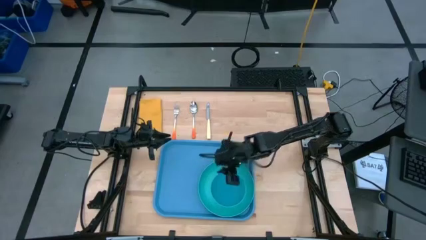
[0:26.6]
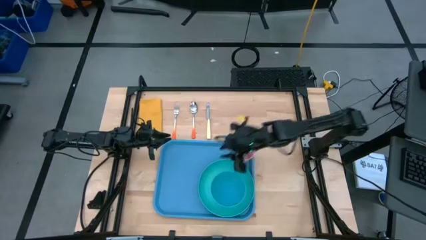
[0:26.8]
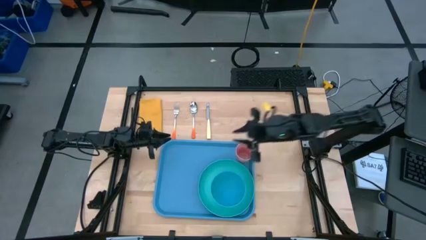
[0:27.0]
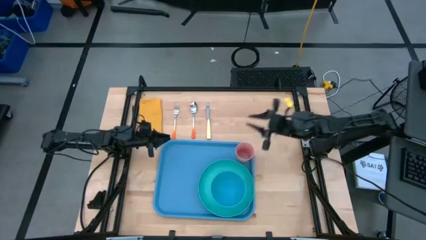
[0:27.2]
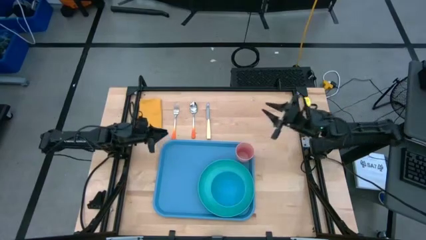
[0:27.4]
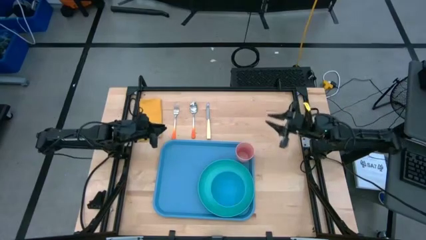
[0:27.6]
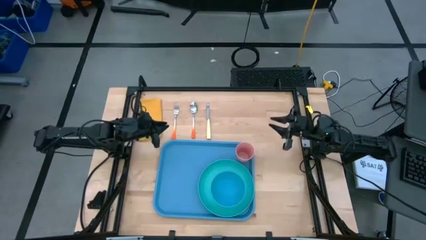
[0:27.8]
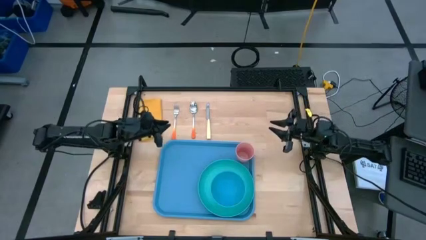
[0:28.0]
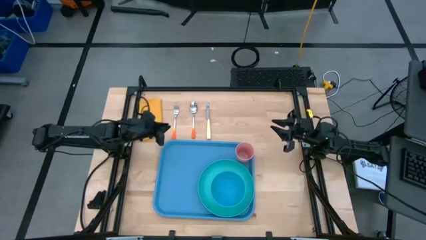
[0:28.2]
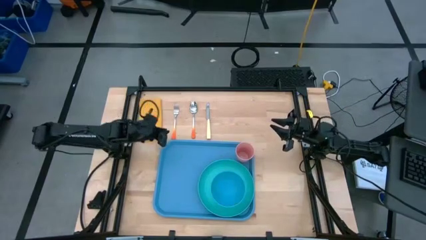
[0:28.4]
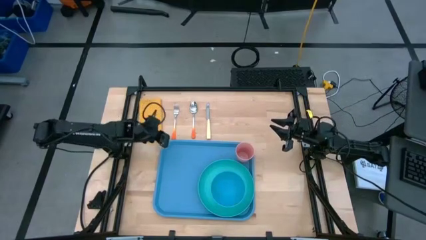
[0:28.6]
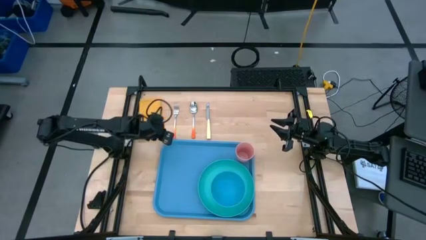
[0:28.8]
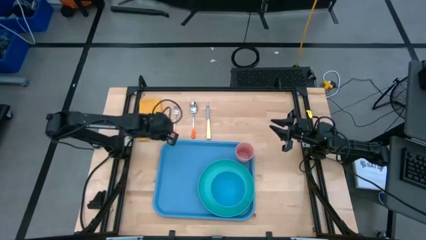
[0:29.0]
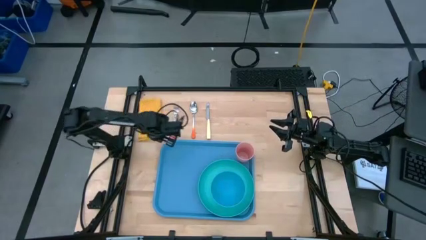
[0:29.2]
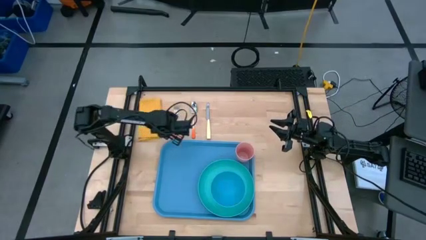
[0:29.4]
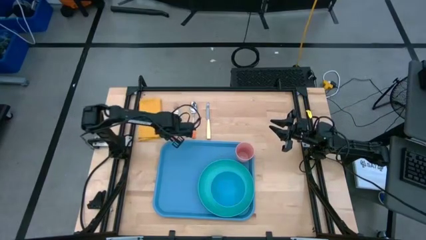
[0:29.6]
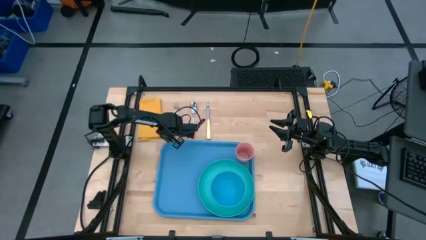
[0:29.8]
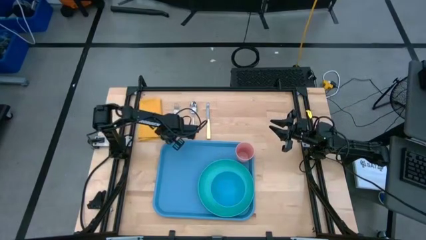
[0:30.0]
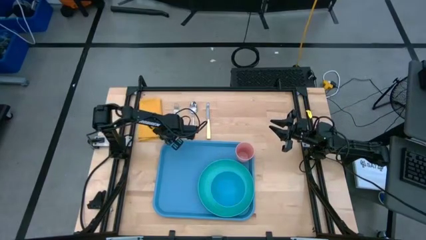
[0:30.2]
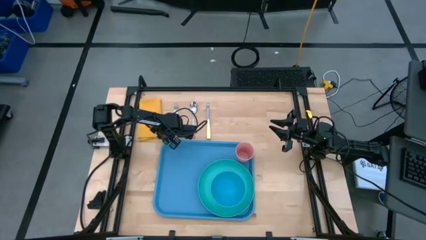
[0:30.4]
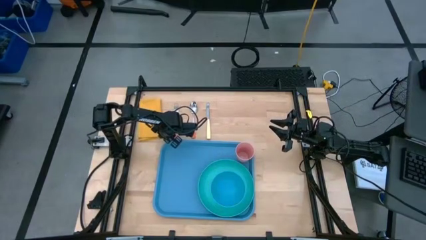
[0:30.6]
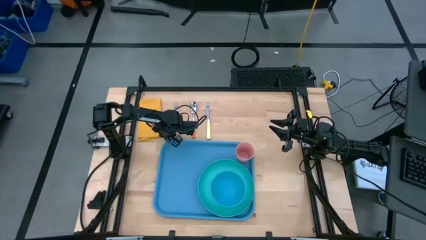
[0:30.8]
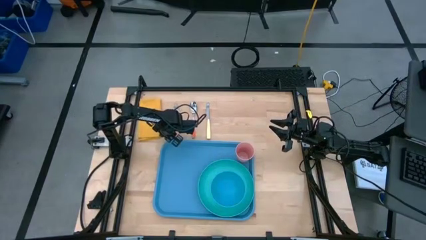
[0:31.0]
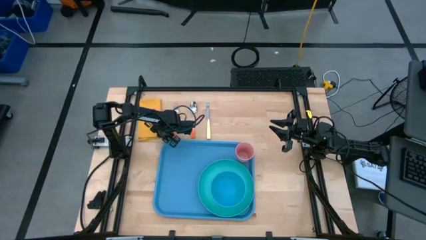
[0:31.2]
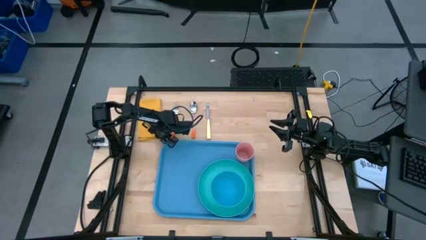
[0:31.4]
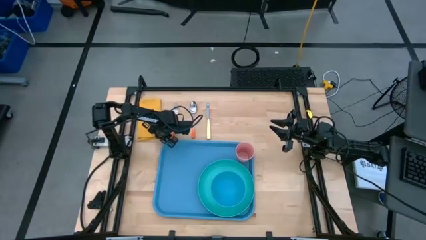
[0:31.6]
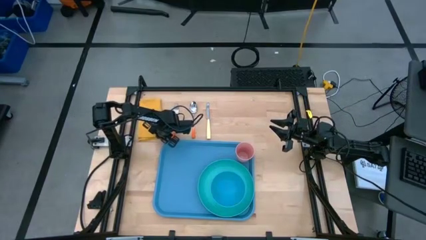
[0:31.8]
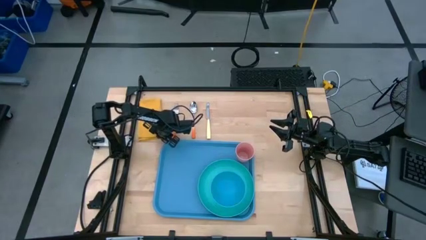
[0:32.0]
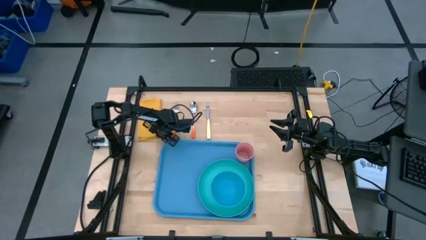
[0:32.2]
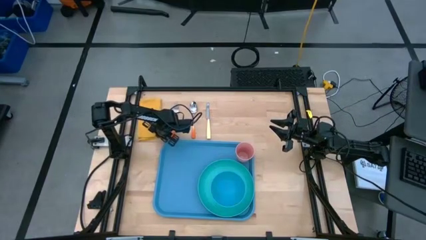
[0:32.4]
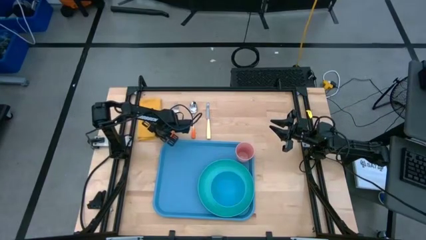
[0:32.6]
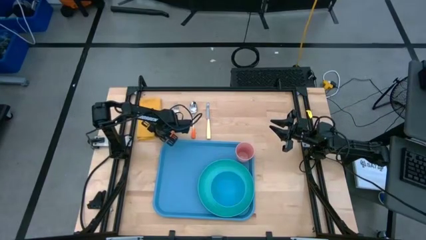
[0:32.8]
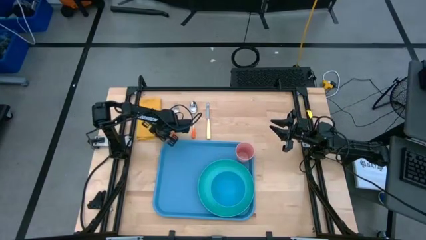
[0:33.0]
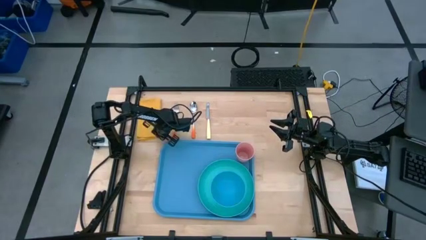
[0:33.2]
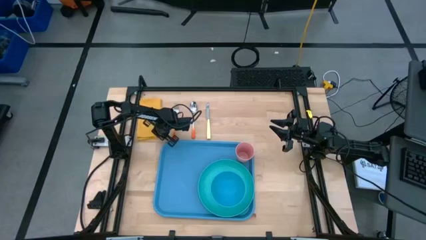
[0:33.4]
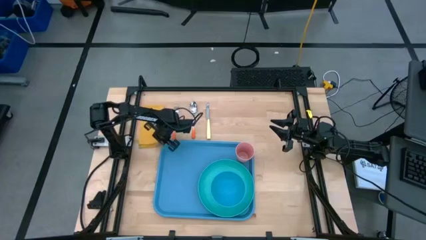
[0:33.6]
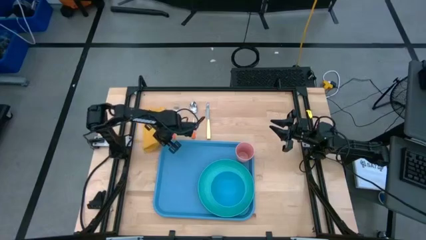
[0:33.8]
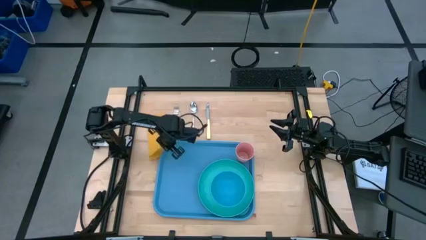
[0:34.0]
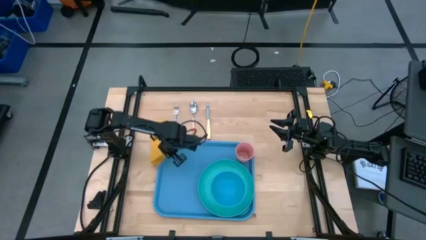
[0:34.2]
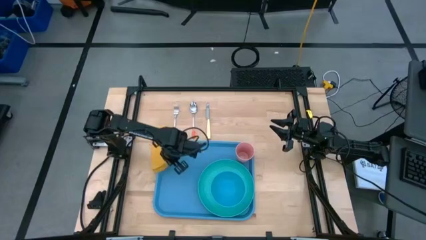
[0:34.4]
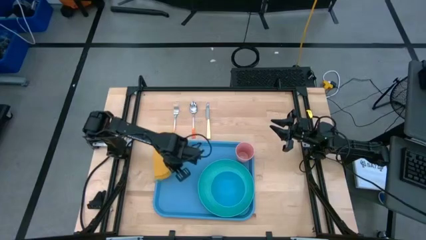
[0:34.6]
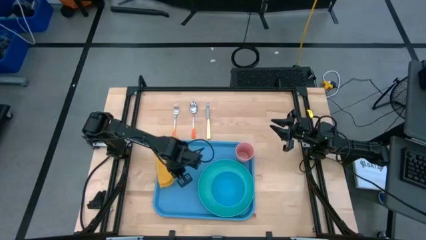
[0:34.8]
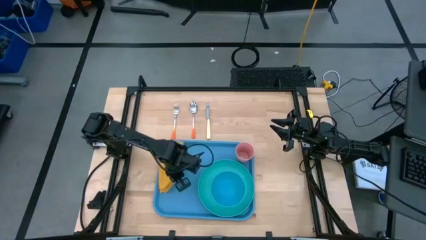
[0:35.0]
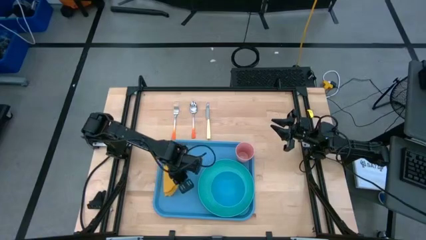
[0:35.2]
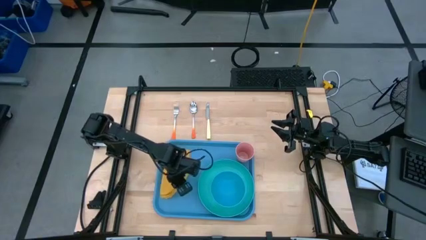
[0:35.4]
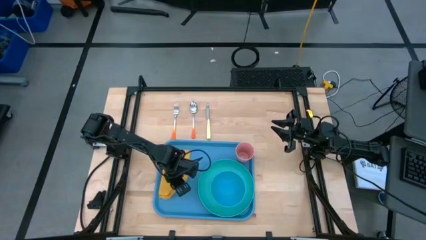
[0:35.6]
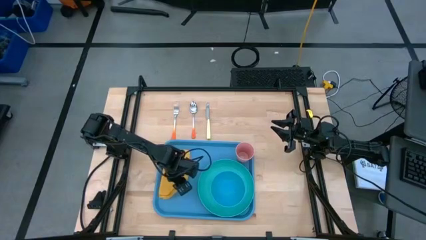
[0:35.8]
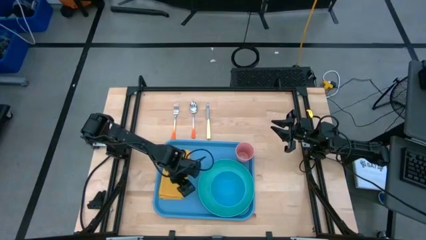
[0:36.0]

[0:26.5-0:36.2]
Task: Set up tray
Put the yellow napkin on the blue tray

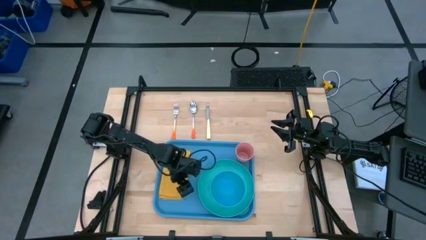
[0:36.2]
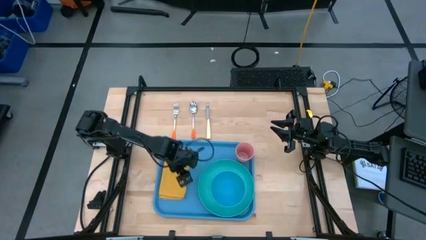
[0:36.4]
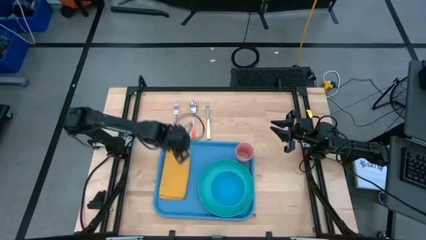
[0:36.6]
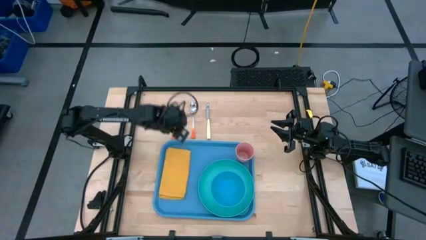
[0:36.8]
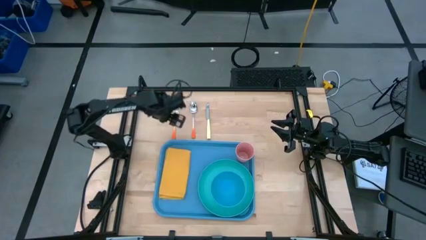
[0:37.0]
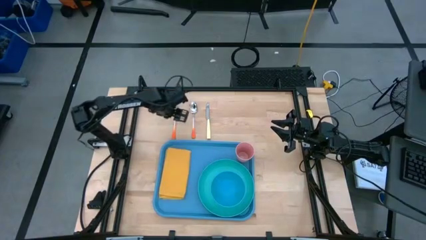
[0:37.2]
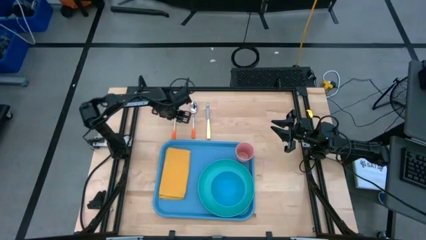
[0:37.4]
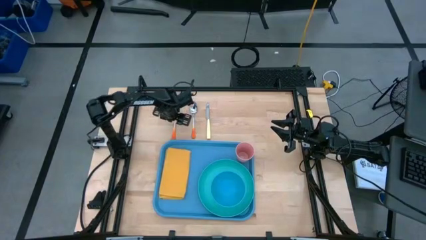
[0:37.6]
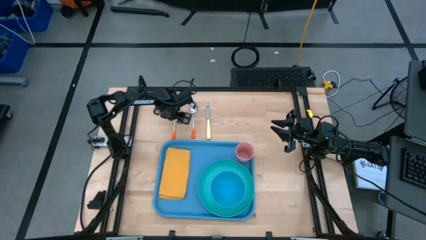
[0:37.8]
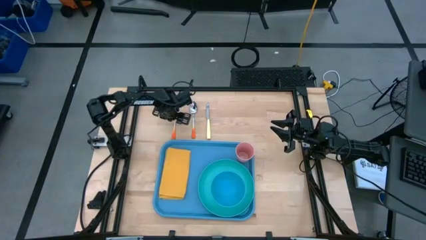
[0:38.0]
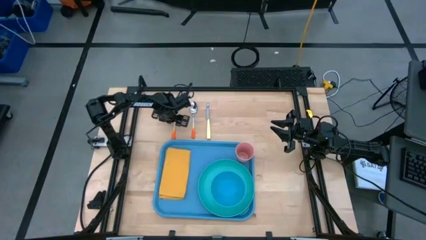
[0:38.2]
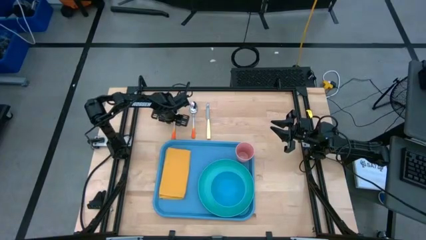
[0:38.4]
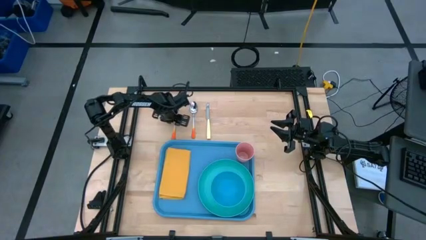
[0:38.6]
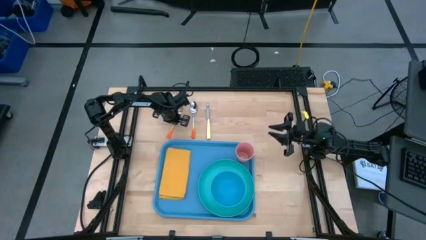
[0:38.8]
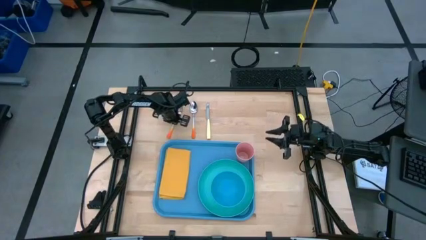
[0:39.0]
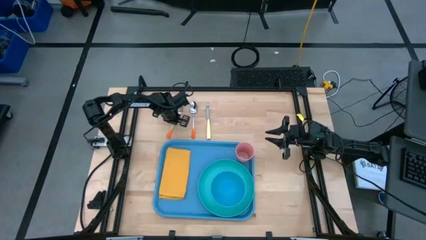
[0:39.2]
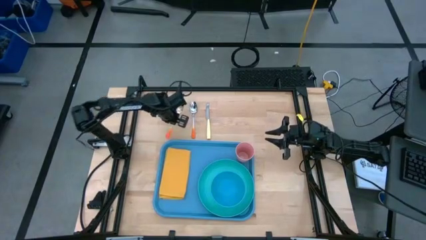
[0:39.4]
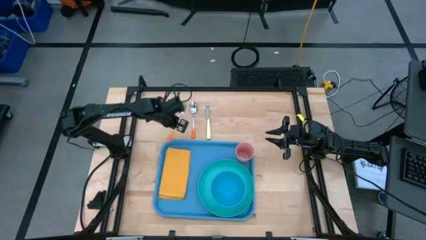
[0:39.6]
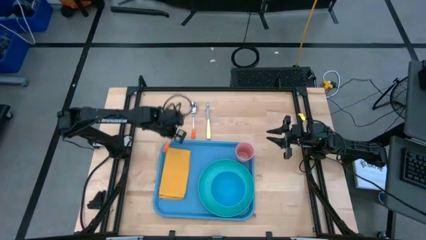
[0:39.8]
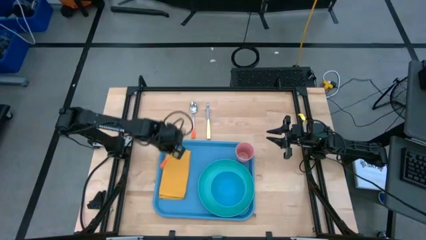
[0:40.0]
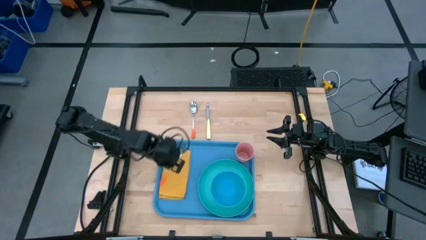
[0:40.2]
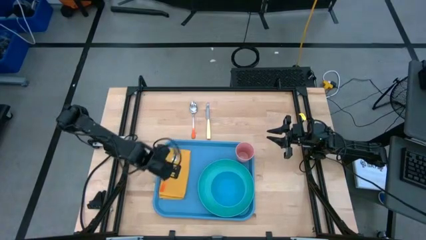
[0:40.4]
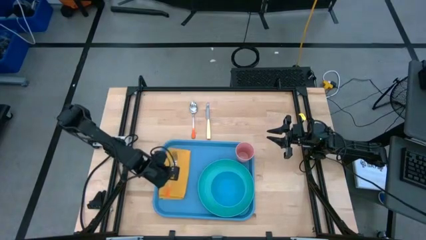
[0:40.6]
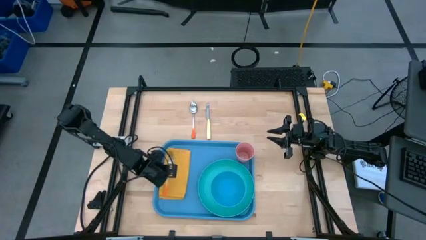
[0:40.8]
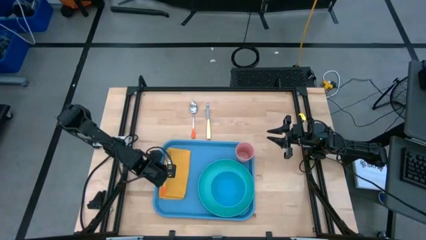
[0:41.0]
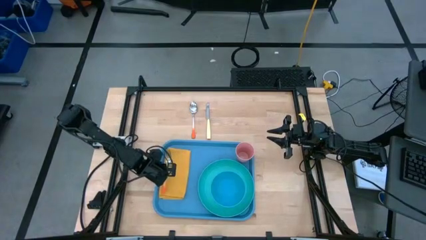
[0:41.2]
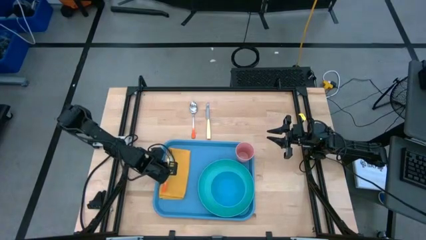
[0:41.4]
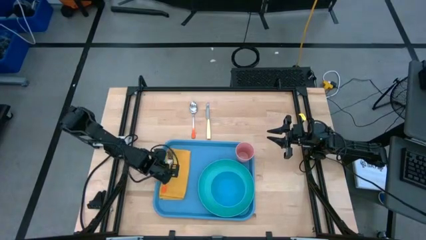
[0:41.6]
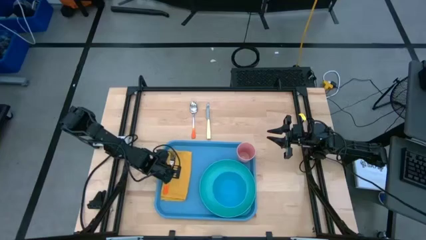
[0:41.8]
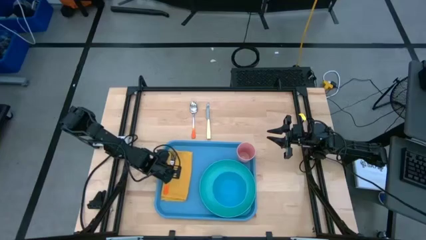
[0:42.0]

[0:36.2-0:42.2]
Put the orange fork on the yellow napkin

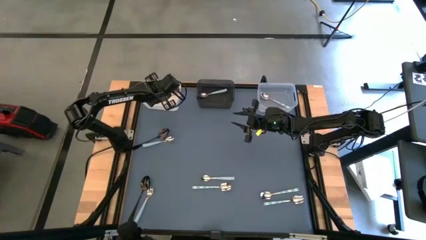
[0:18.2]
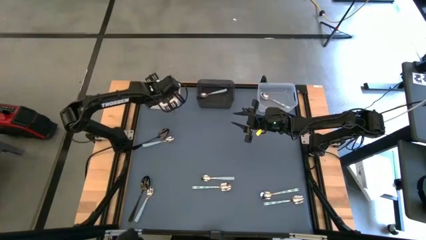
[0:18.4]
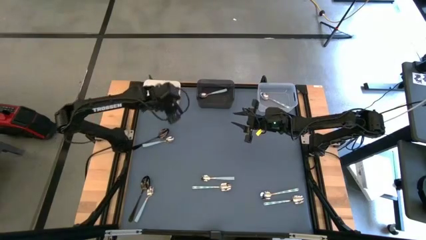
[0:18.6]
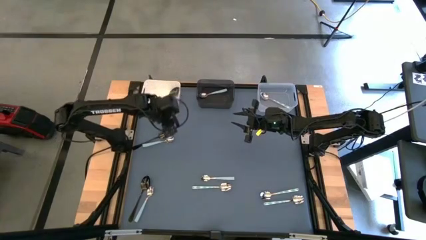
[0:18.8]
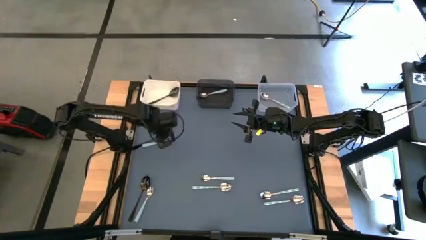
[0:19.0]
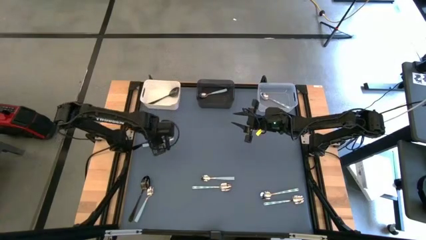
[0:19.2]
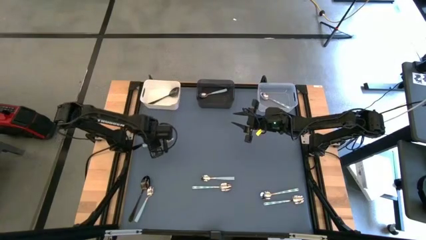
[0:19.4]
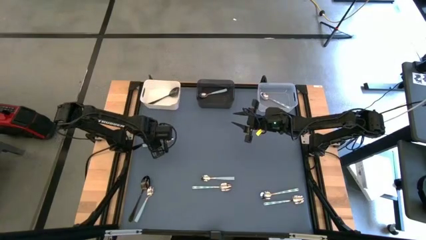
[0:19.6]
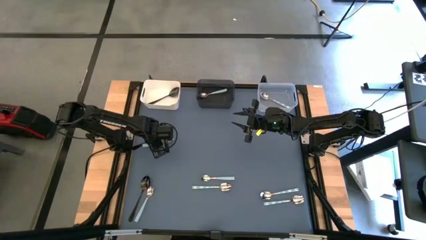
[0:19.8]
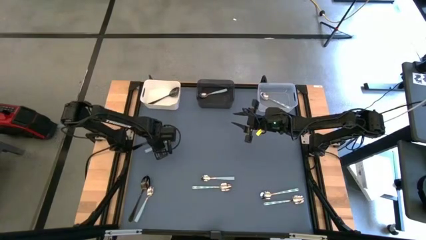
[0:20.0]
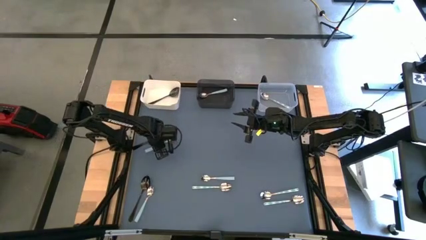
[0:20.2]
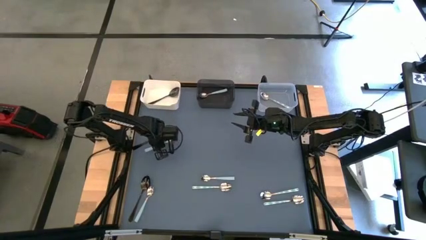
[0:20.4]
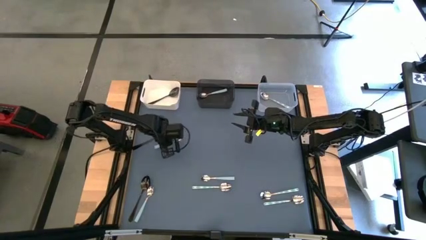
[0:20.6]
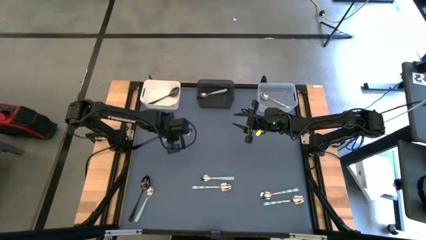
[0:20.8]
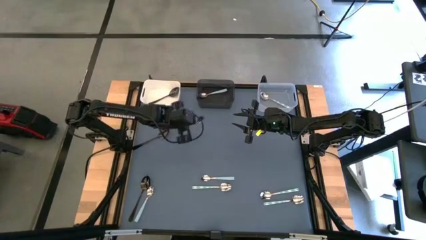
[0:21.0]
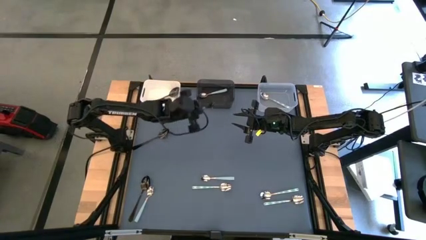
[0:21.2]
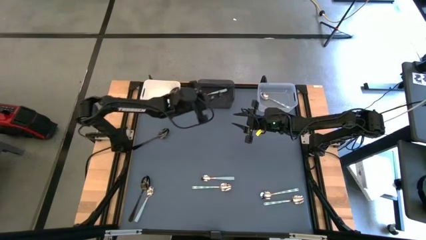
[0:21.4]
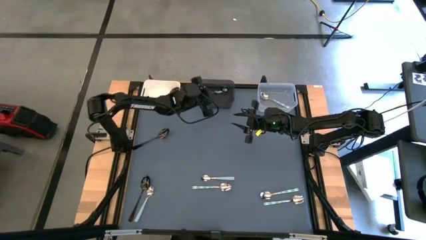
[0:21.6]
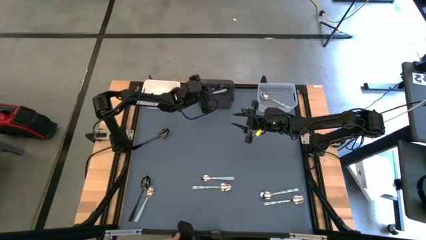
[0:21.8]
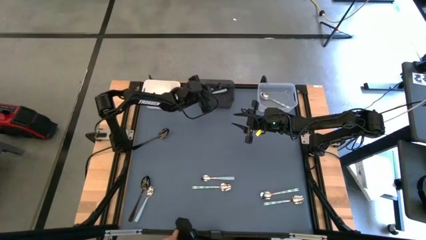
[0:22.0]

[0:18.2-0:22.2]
Task: Sort silverware by color (type)
Put the top left sky blue spoon into the black bin
